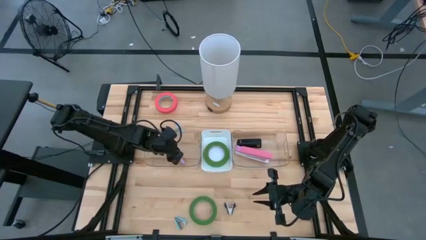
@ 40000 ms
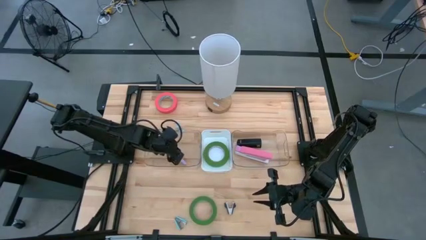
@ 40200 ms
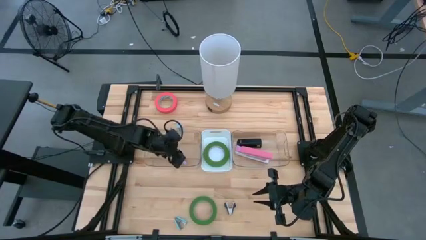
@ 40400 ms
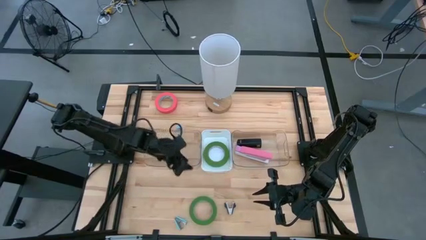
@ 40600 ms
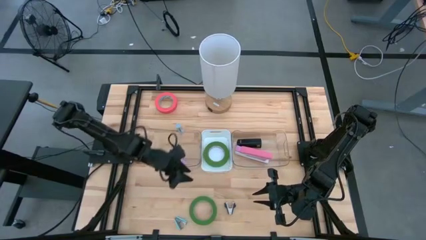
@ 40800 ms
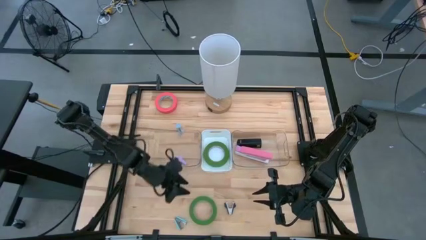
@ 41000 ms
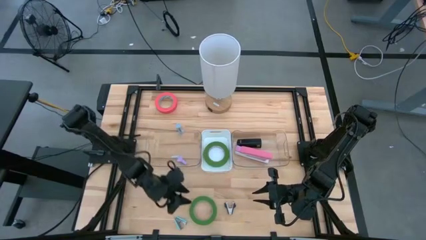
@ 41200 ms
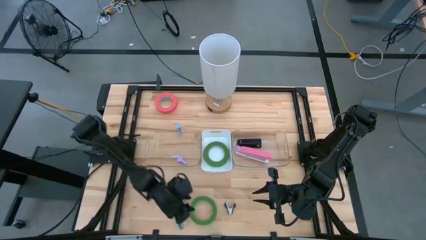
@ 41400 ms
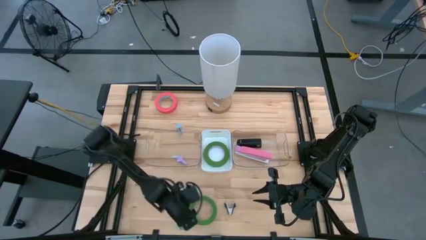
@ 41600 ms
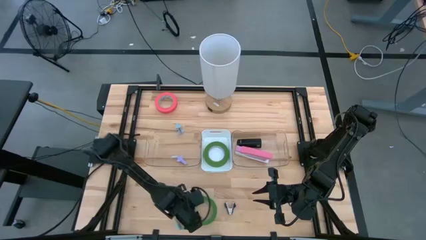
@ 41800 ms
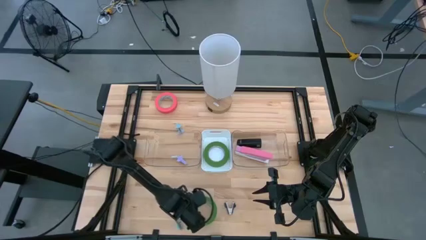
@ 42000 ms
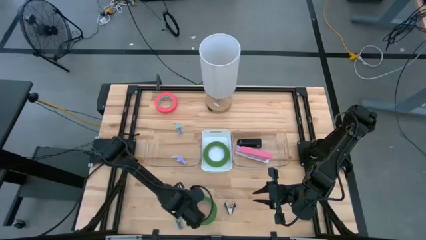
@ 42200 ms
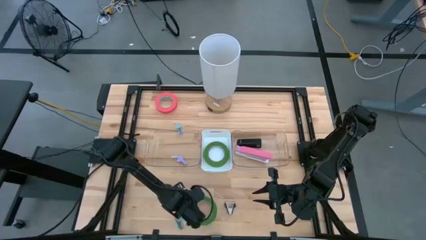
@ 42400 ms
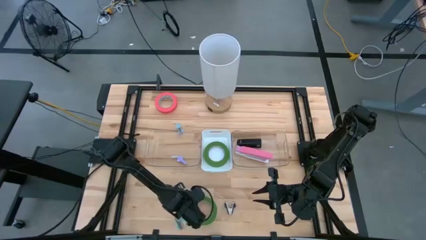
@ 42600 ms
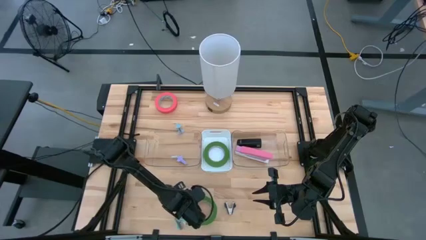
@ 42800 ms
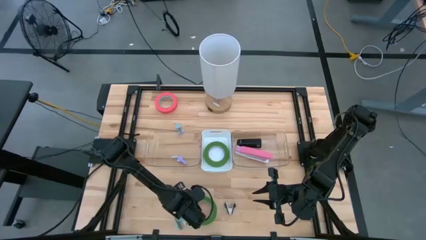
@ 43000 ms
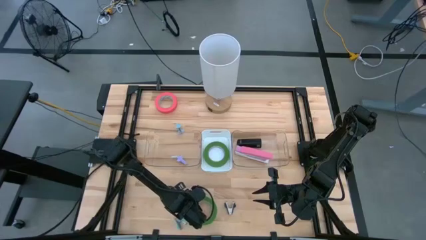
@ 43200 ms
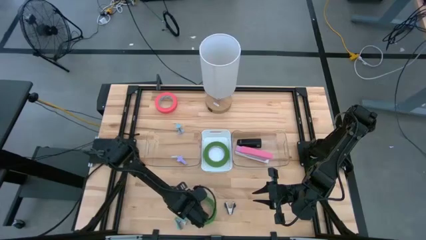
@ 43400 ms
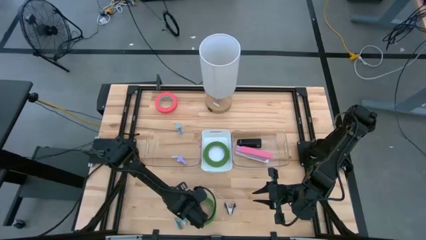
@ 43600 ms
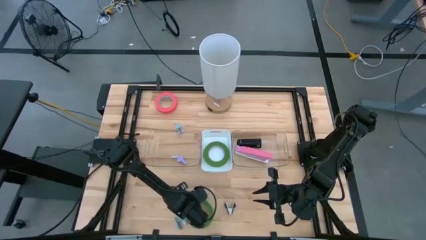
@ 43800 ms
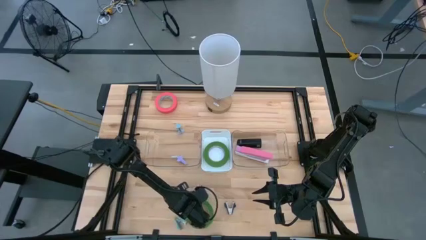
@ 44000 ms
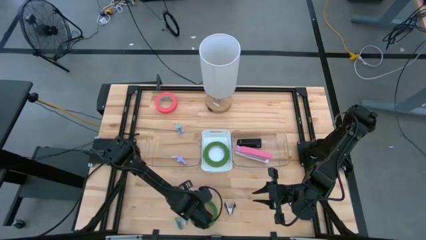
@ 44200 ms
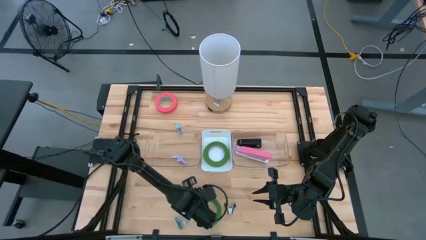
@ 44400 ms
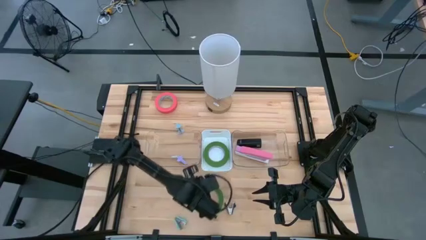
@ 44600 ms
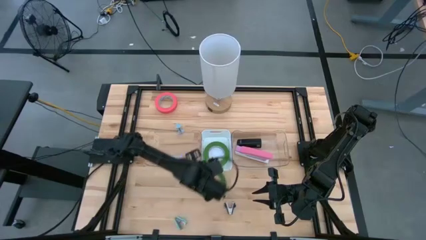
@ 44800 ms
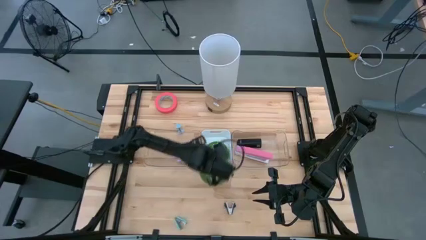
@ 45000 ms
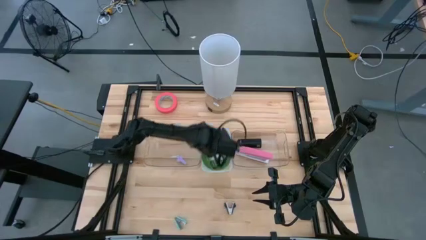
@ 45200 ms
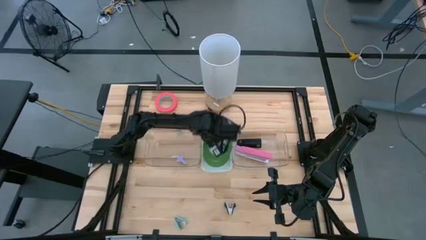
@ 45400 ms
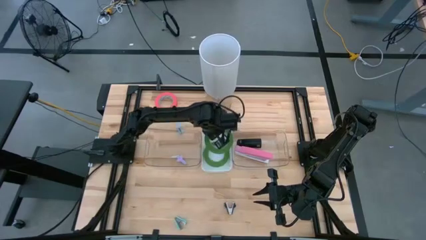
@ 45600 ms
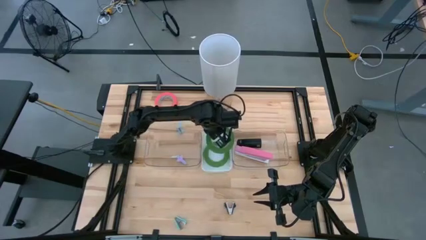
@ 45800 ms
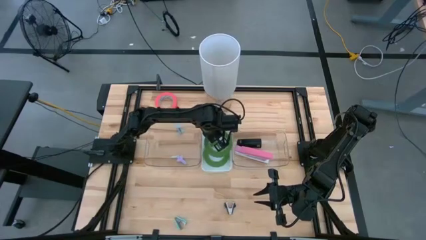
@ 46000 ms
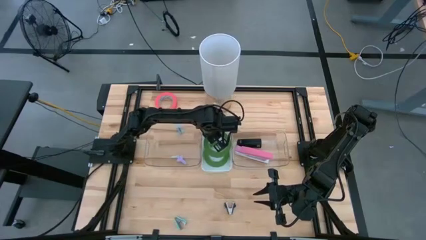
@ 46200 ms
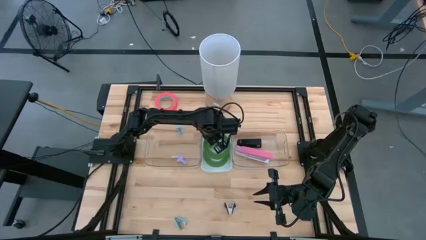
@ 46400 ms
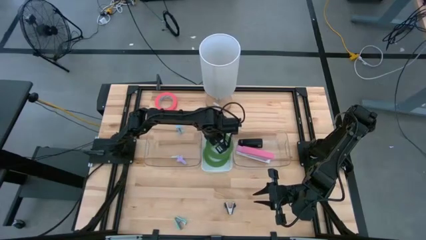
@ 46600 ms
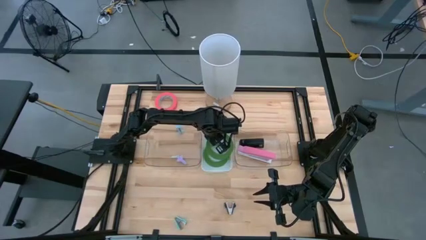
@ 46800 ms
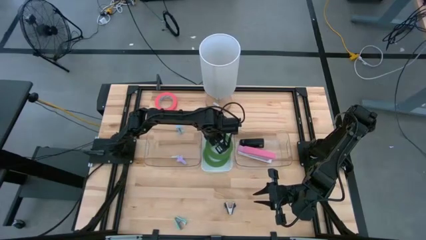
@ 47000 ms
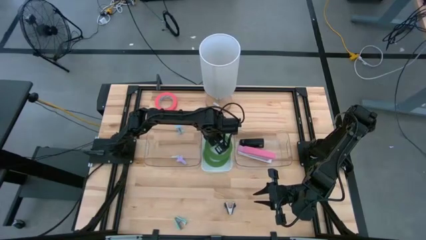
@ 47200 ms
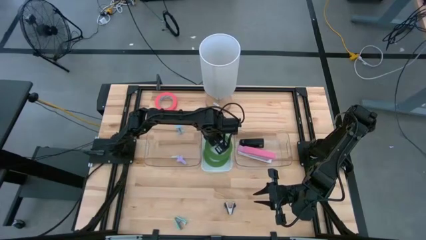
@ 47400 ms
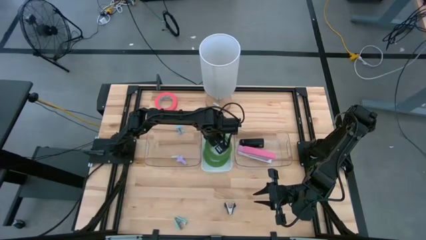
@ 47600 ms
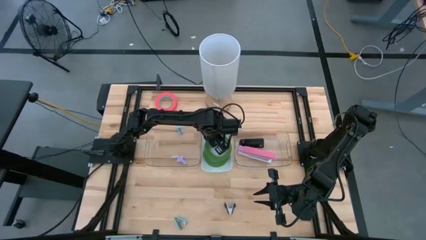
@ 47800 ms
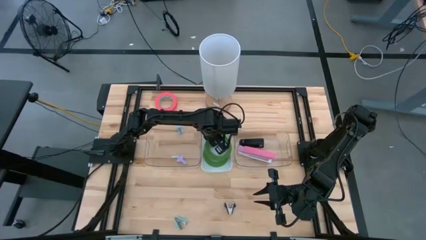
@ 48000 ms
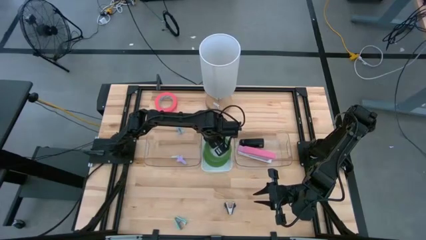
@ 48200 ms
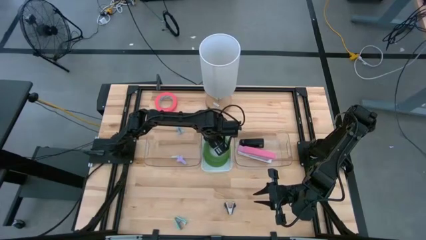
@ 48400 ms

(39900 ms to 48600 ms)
Task: Pick and place Stapler, Stapler remover, tape
Put the green tape into the white bin

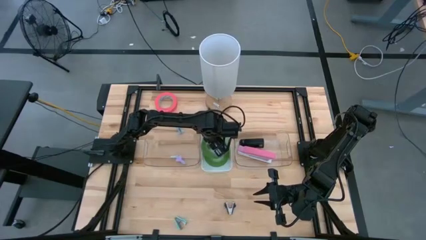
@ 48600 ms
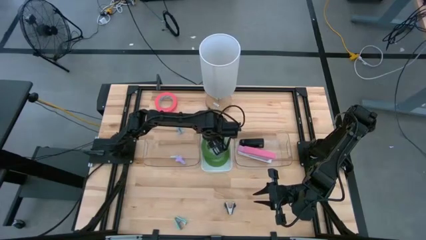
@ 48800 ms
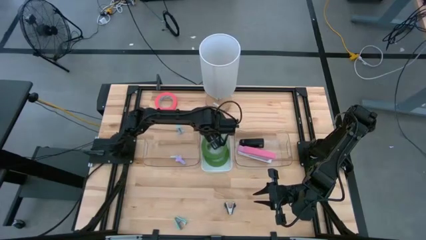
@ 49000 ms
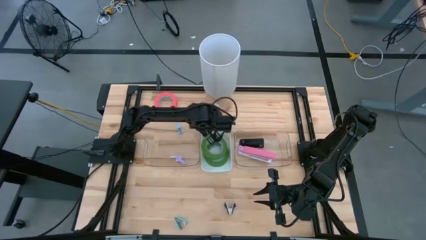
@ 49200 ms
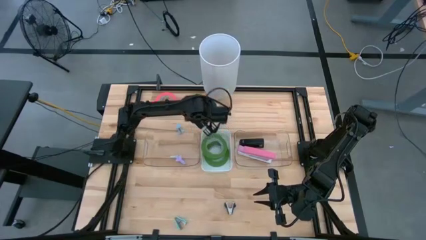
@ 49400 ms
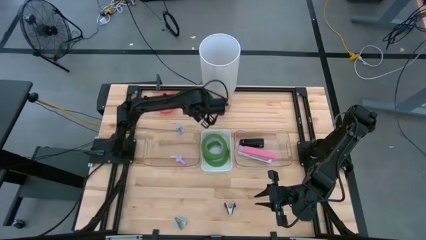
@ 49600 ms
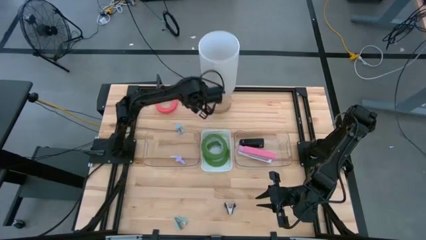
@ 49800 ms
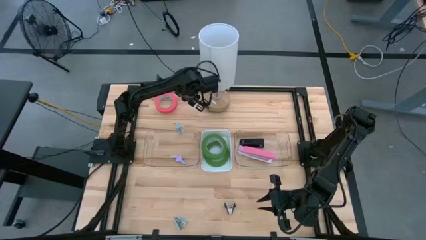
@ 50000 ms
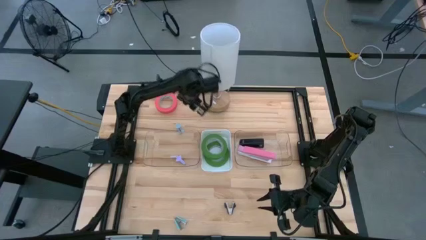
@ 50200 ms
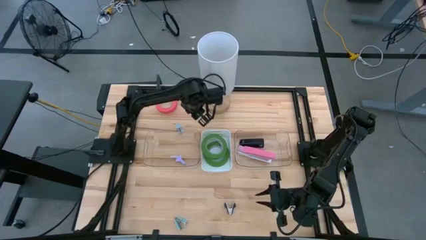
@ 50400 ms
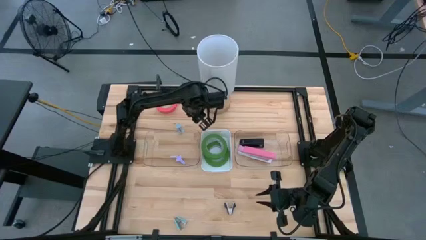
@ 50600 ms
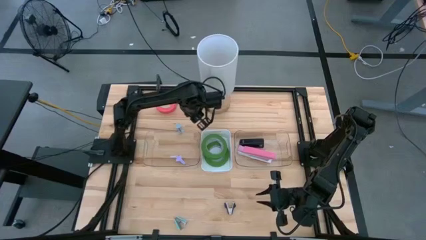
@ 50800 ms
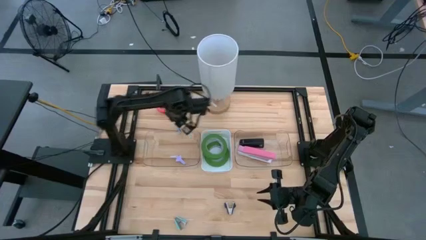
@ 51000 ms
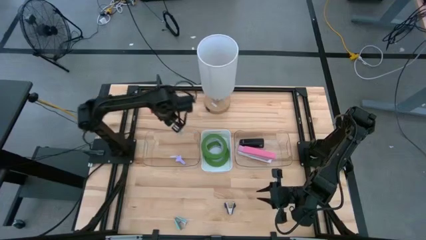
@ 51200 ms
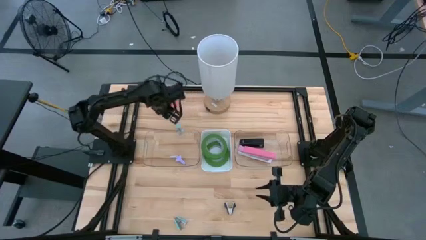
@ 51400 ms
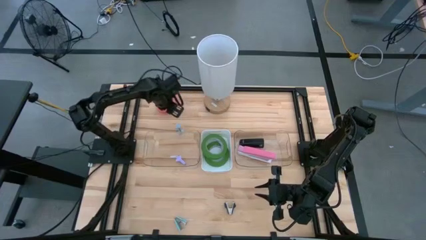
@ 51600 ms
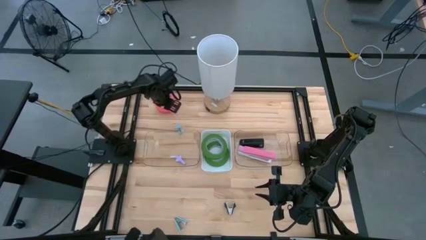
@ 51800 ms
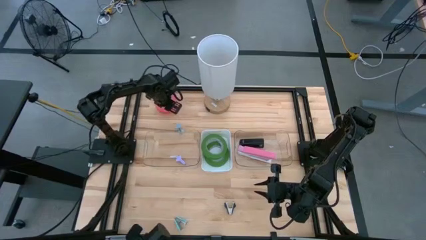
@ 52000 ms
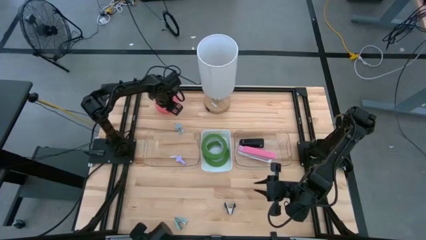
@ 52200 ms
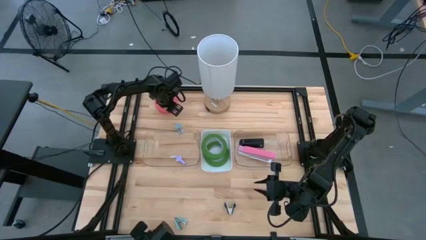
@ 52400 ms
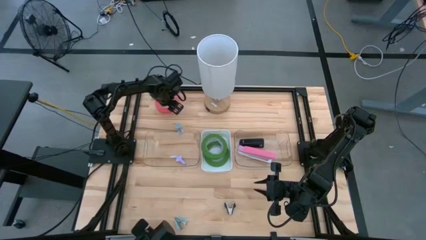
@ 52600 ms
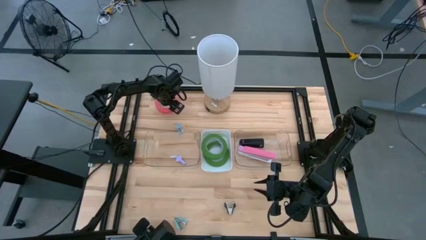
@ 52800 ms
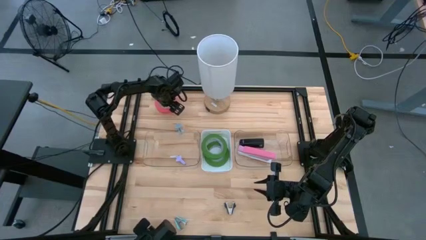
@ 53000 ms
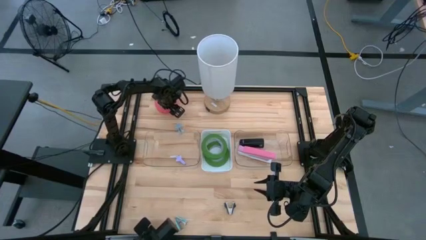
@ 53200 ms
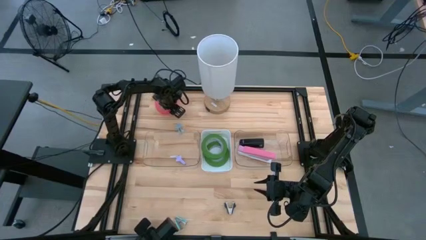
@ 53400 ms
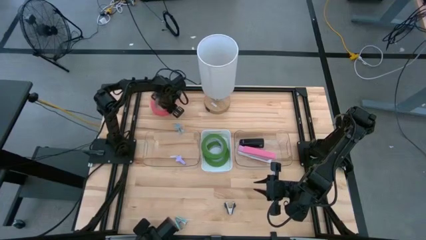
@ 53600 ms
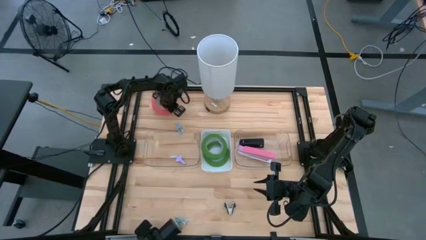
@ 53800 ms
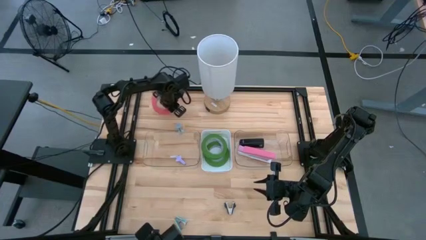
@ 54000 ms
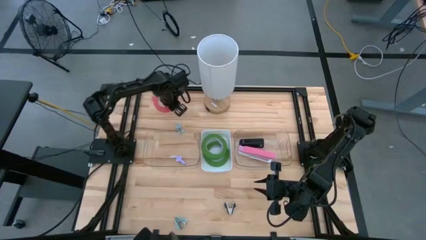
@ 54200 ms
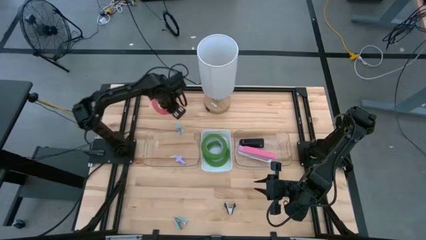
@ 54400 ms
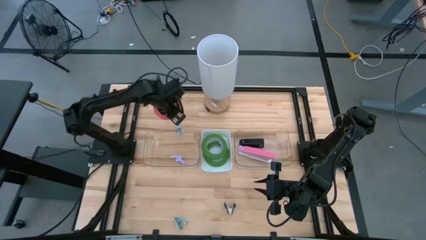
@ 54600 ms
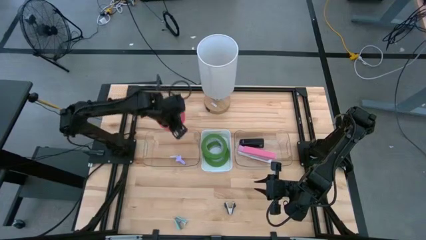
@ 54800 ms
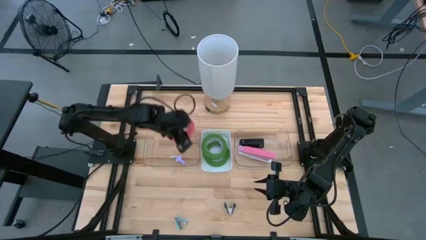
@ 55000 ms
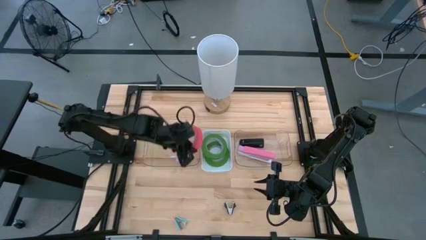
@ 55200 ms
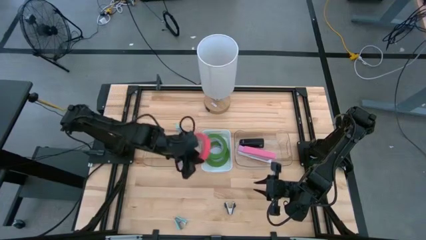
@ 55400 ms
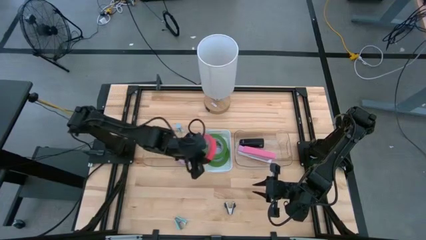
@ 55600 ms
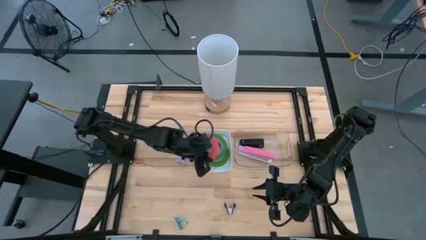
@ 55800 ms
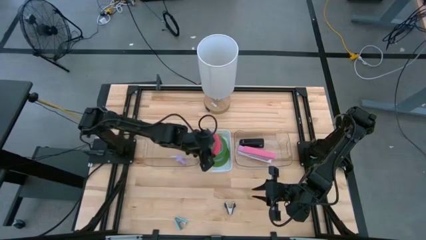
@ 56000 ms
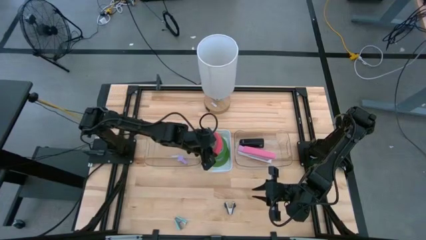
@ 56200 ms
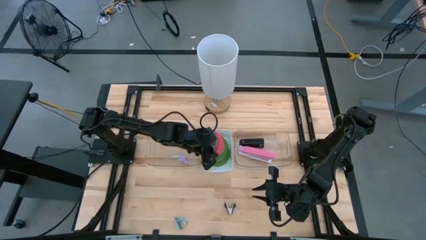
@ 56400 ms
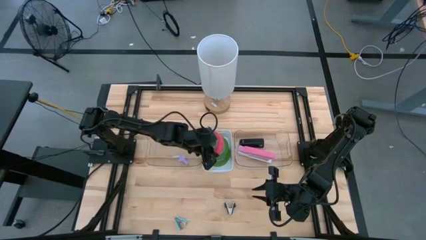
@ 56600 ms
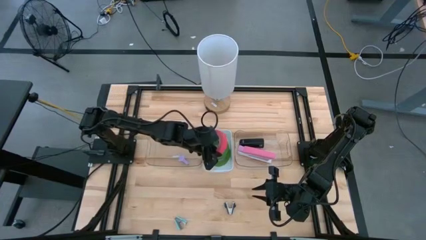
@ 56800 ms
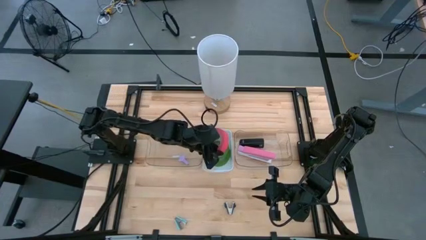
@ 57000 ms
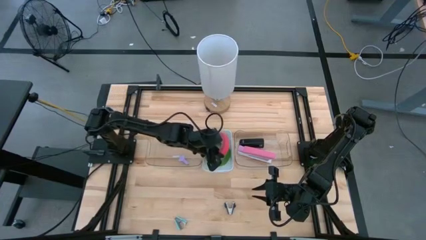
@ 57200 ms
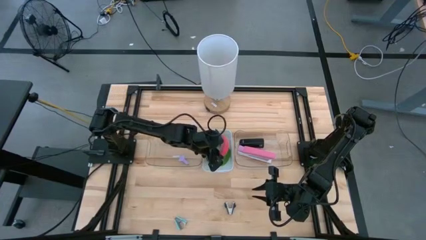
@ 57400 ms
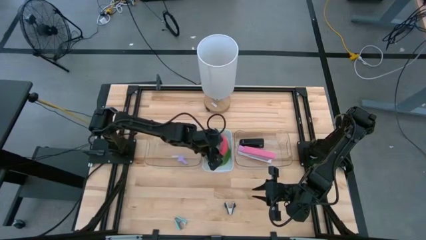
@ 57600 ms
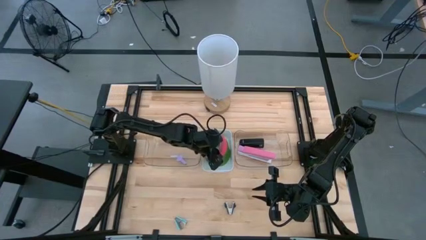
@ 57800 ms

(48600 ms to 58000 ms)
Put the pink tape into the white bin
